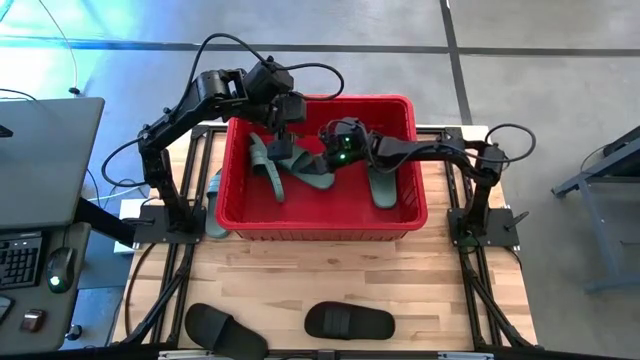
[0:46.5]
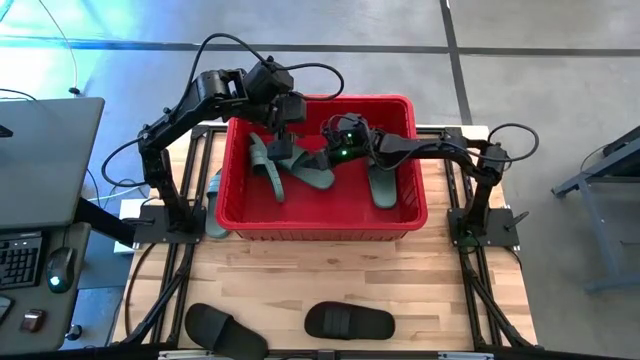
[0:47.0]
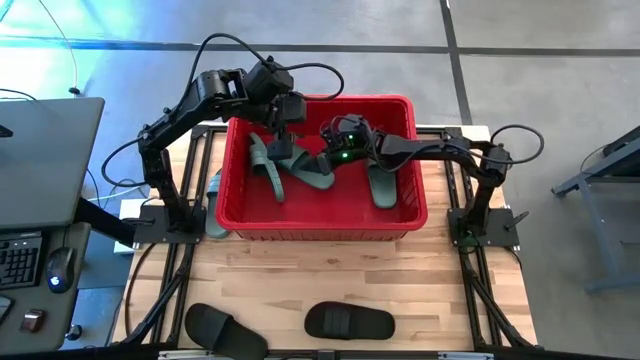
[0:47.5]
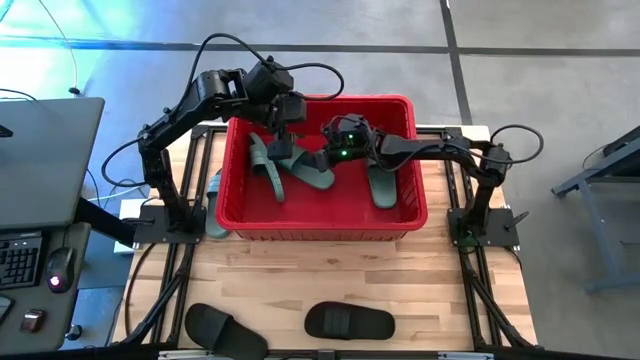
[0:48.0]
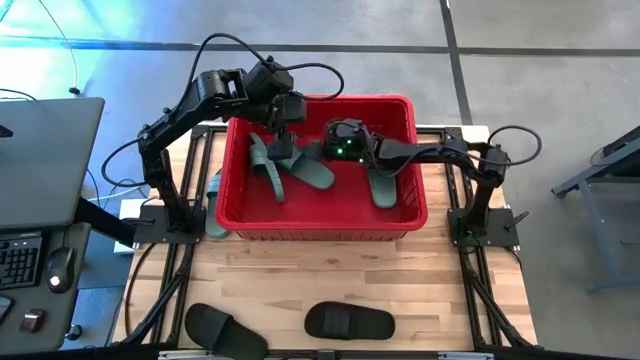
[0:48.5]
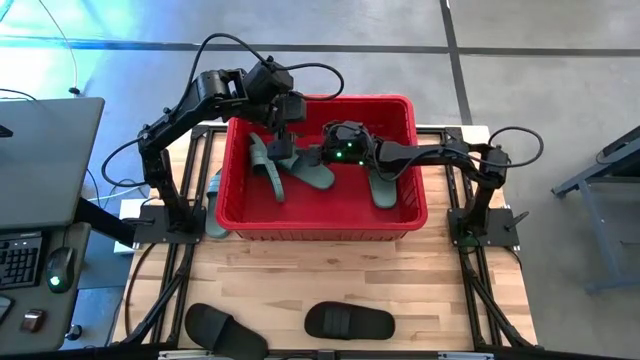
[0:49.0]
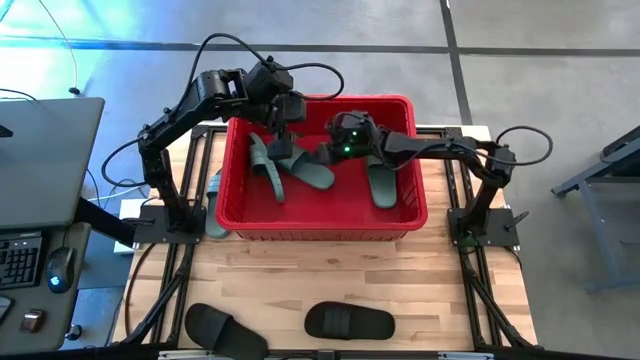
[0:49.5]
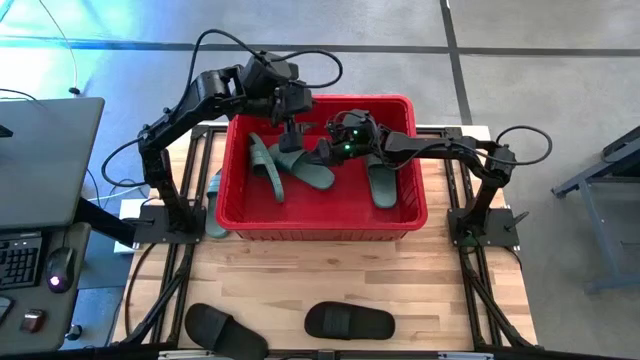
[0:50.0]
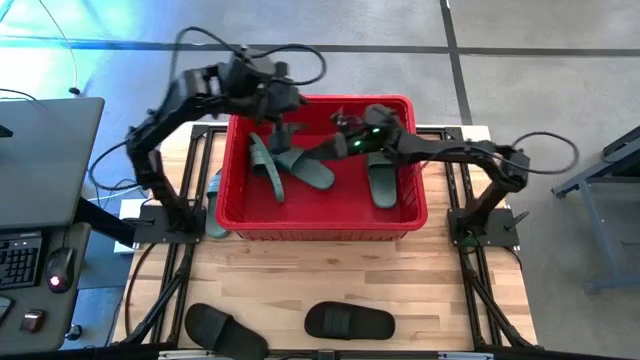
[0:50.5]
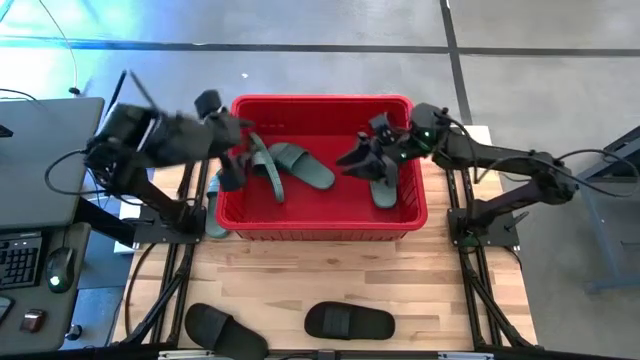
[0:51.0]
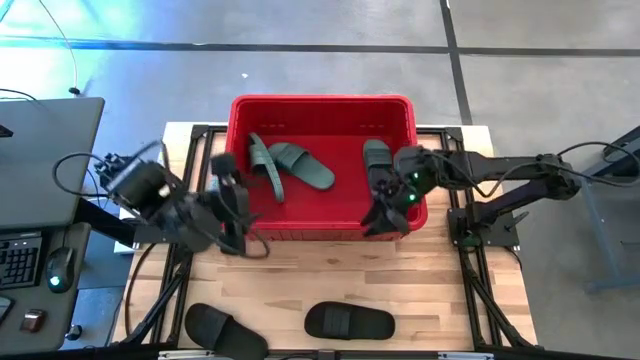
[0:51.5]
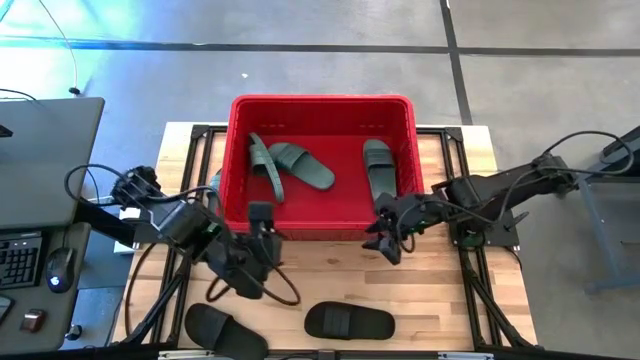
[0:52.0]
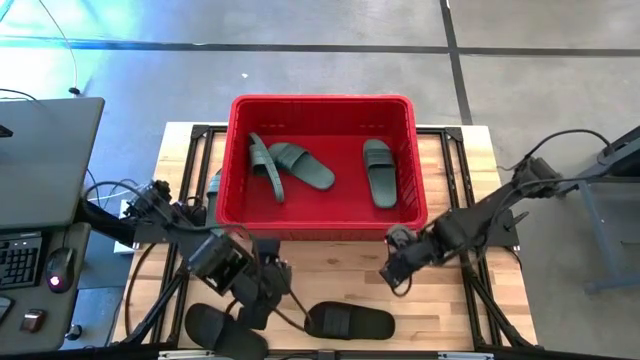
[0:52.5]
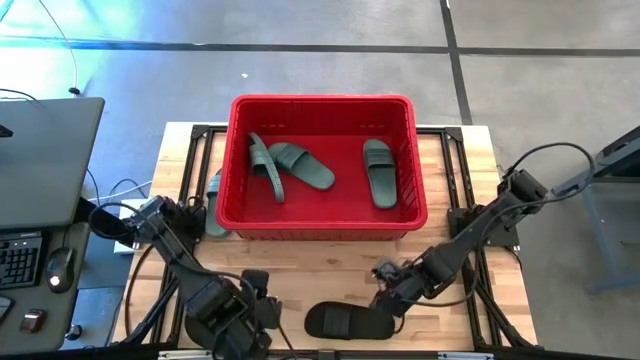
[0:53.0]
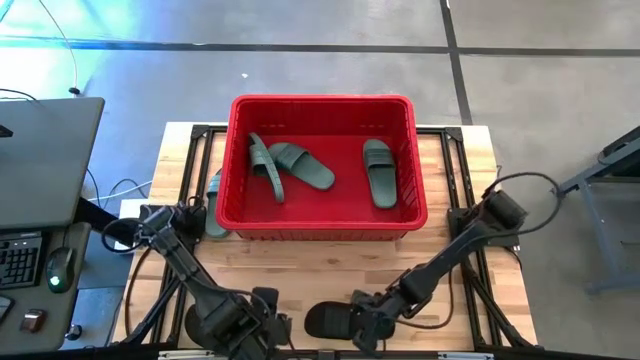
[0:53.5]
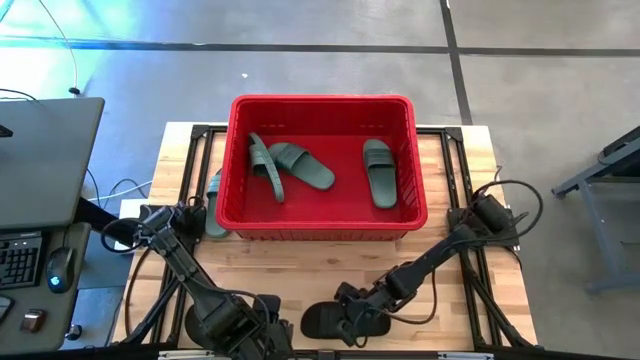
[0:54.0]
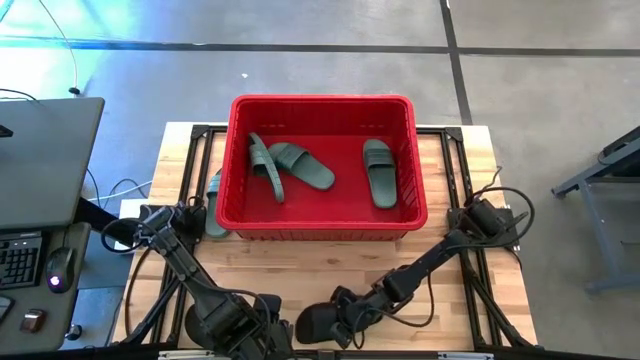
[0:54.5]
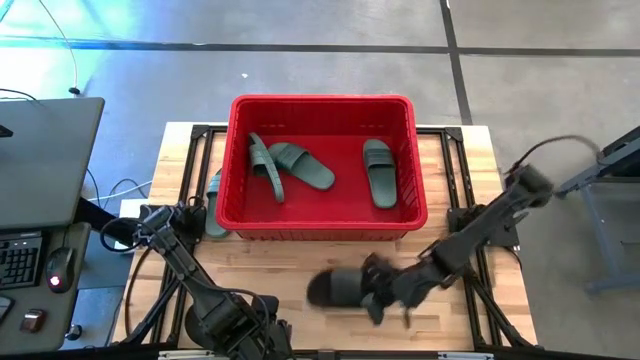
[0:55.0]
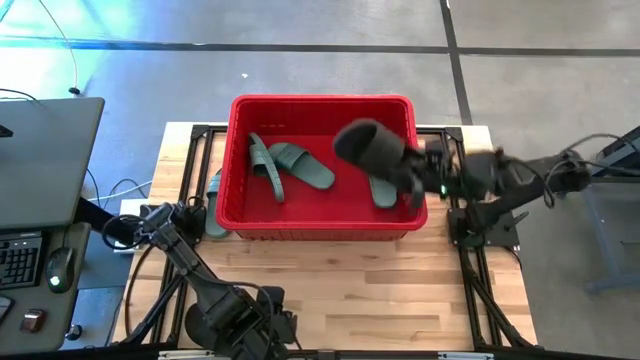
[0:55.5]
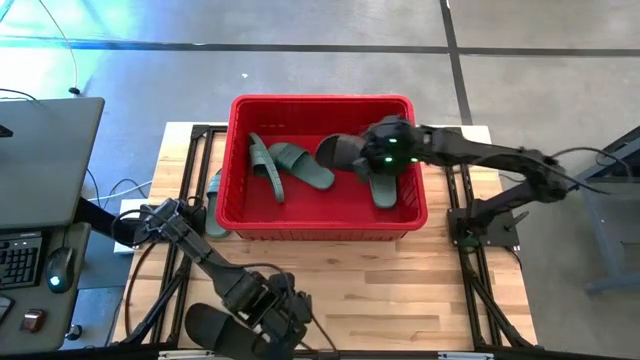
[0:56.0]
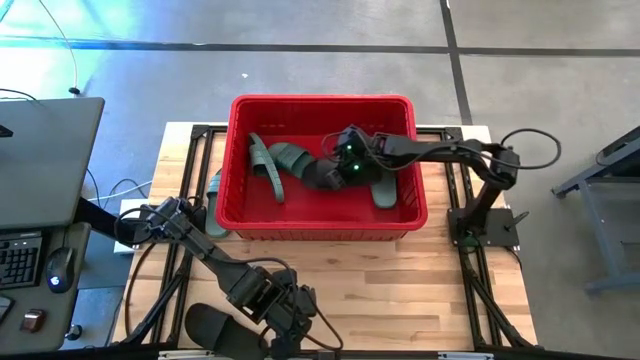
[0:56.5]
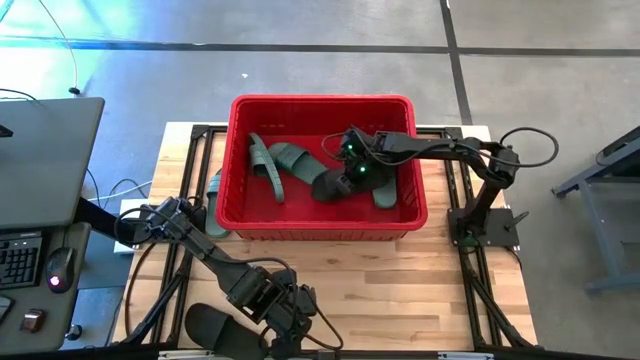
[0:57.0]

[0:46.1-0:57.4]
Task: Pick and place slides into bin
Put the black slide into the red bin

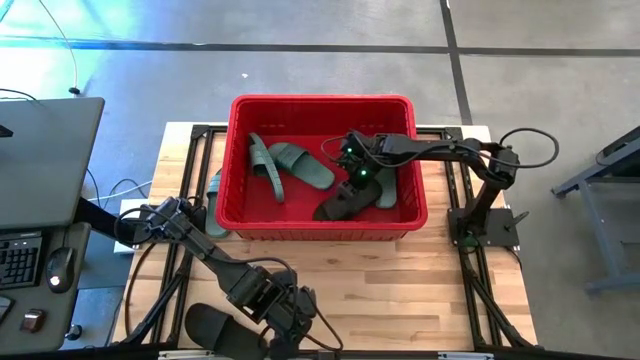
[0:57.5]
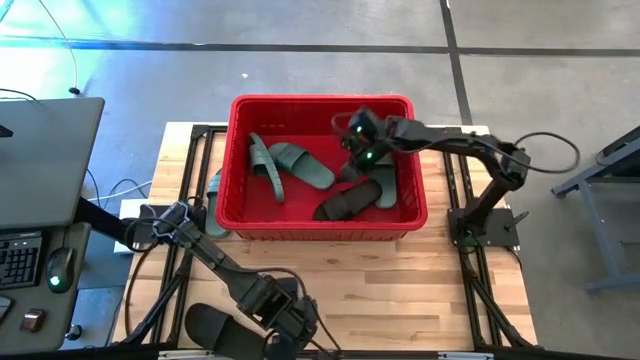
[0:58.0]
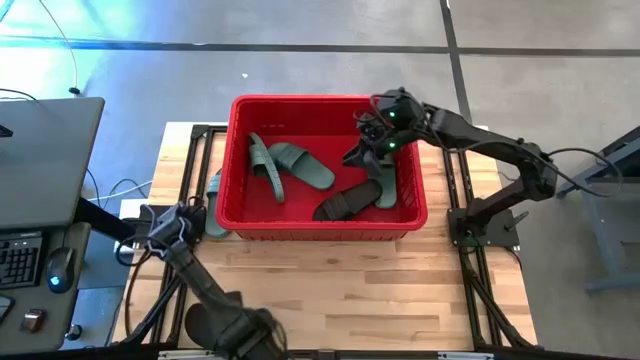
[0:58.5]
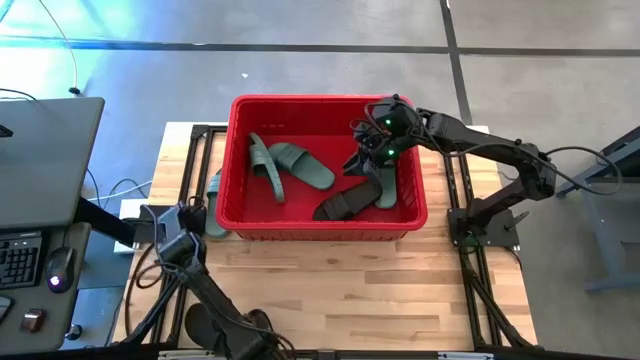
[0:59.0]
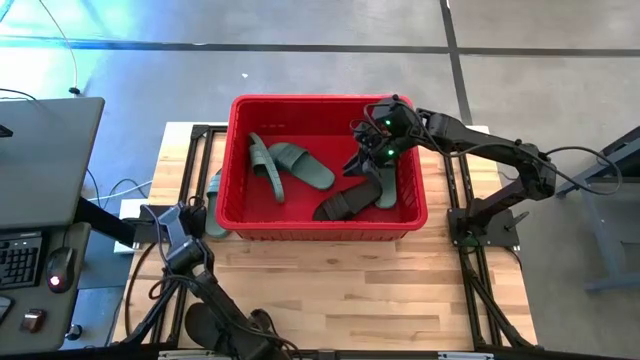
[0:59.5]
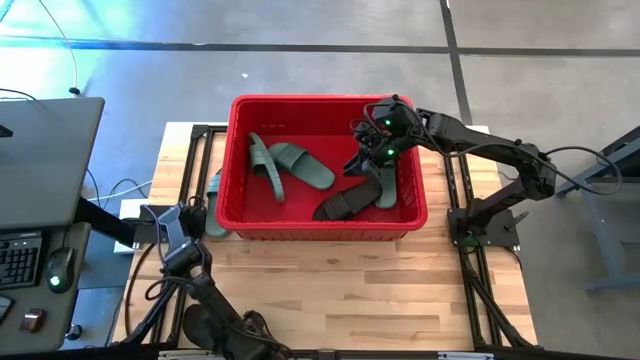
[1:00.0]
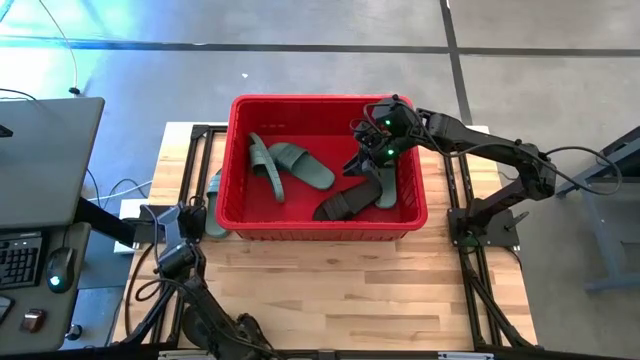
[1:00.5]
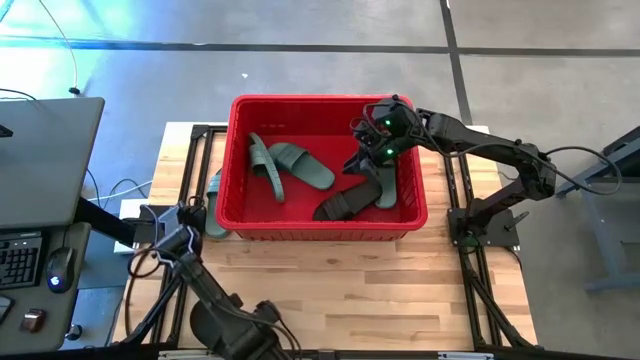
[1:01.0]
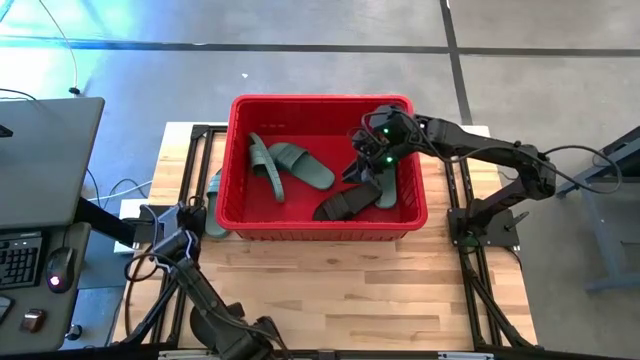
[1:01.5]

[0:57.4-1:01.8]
Put the black slide into the red bin

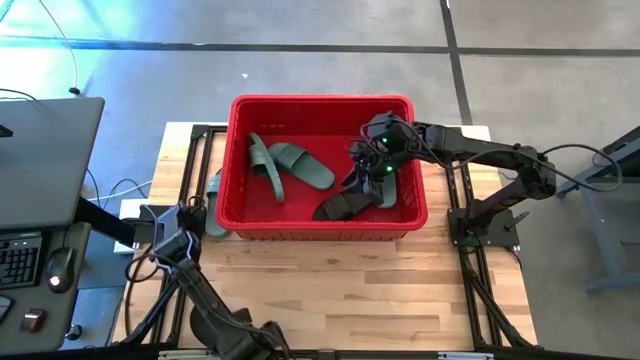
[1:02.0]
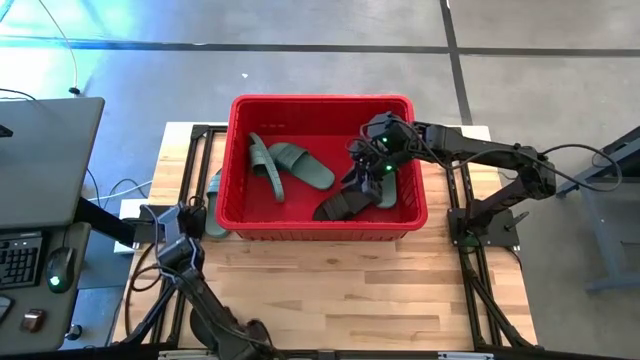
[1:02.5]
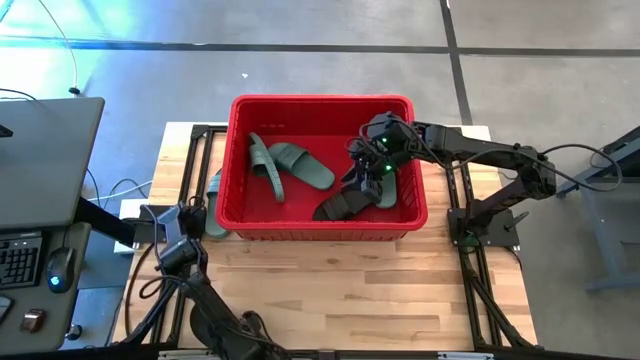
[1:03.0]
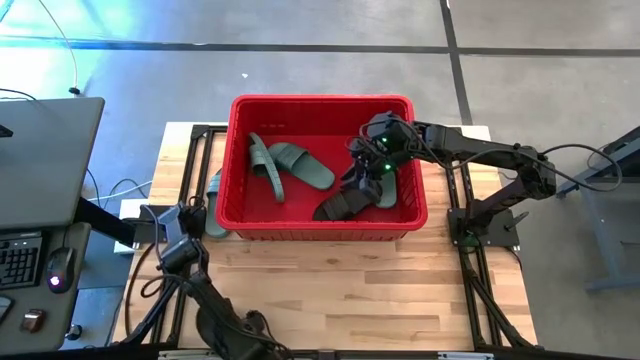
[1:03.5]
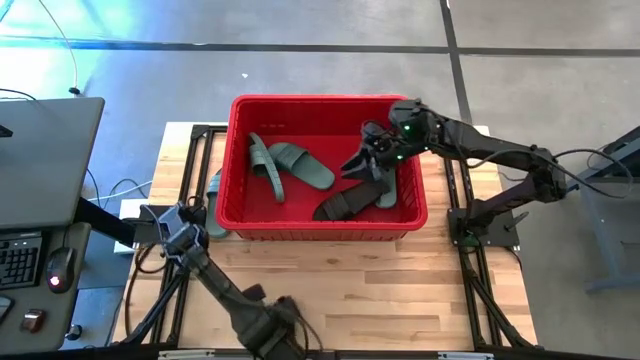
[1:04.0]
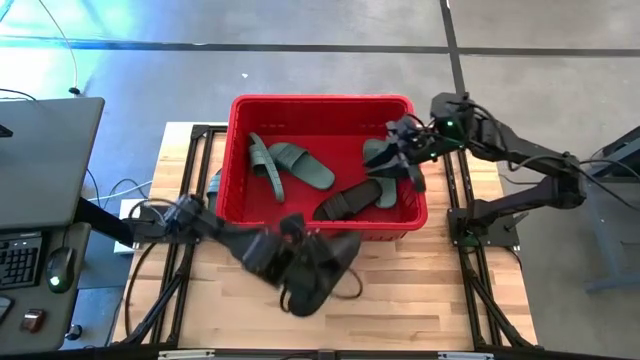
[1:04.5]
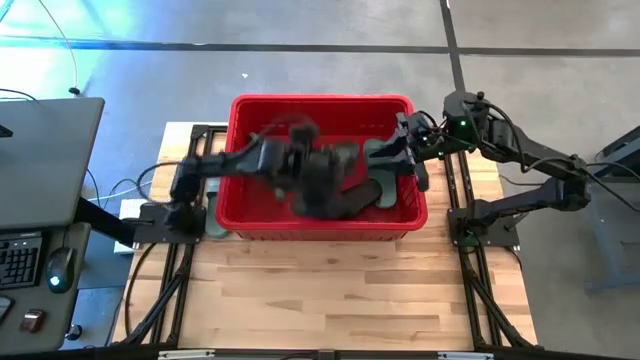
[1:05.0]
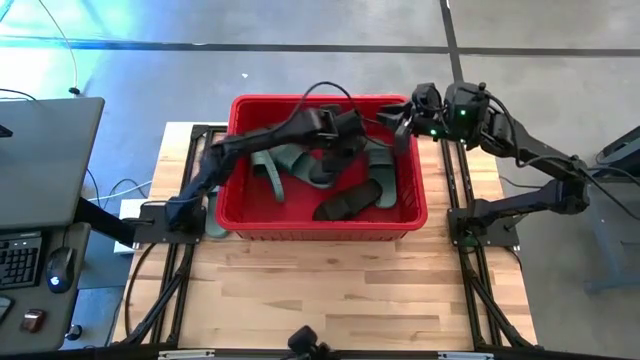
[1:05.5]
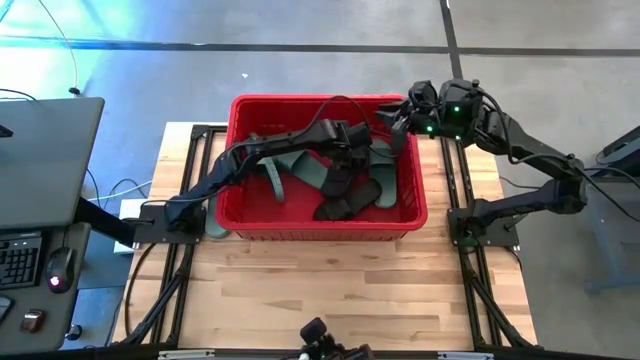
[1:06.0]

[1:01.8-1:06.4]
Put the black slide into the red bin

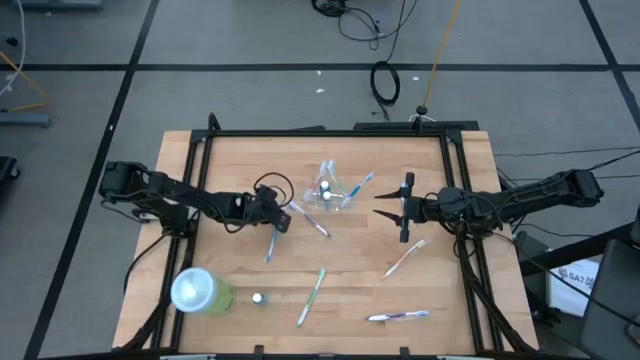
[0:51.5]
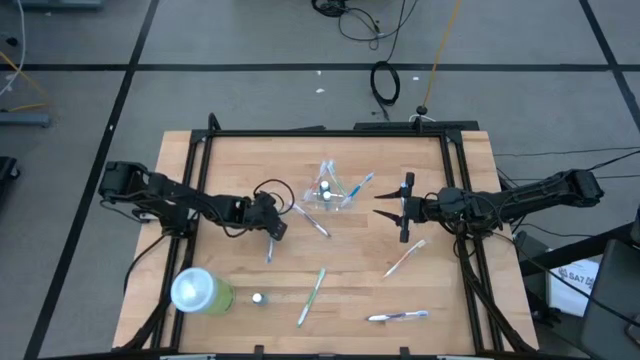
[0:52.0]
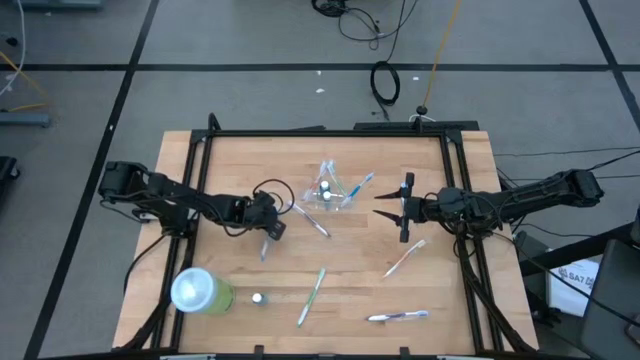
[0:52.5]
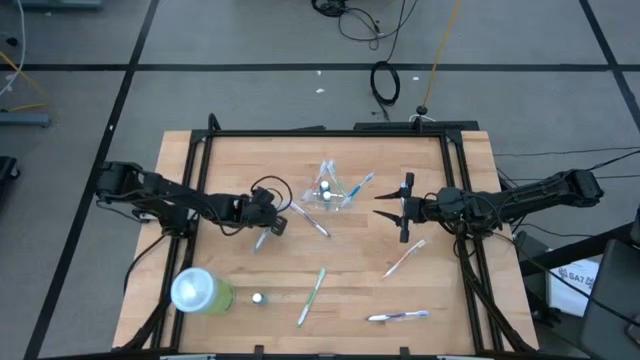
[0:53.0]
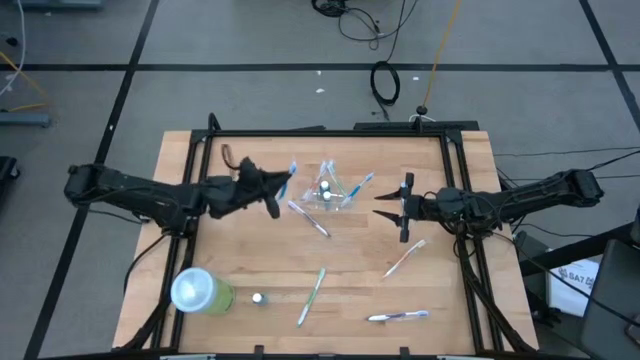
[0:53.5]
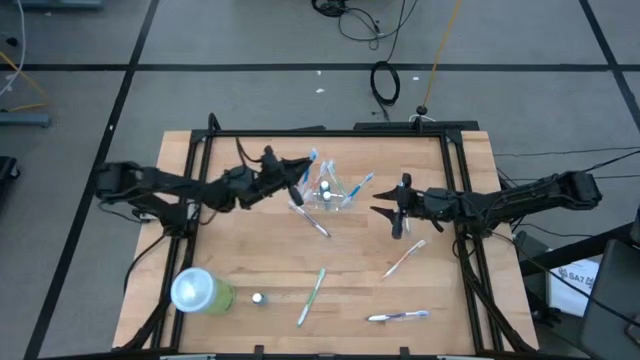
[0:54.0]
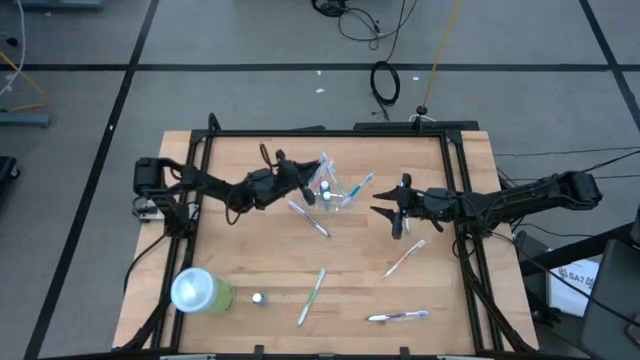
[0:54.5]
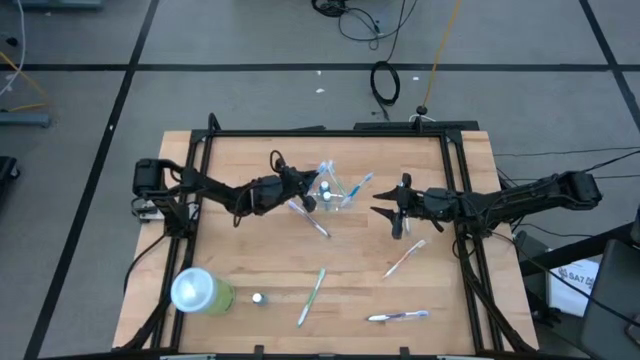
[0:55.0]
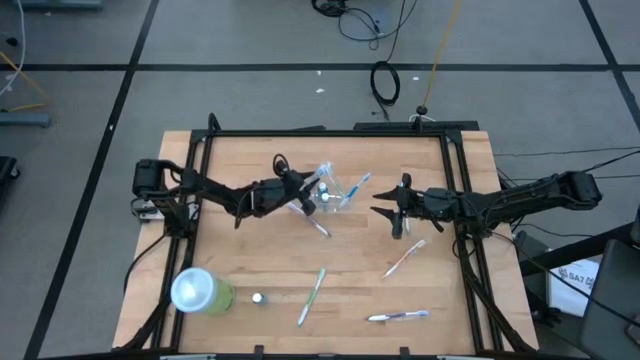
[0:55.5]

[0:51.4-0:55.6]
Task: Pick & Place toothbrushing station
Put the left blue toothbrush into the transparent organizer
